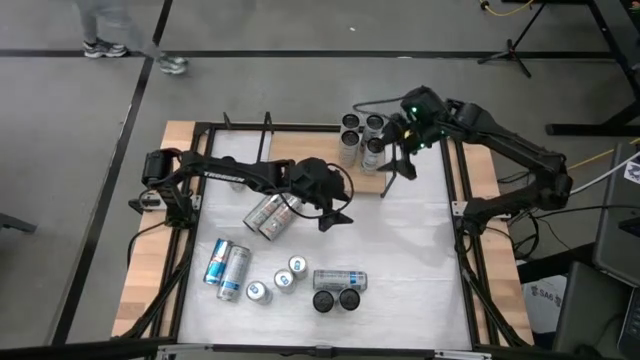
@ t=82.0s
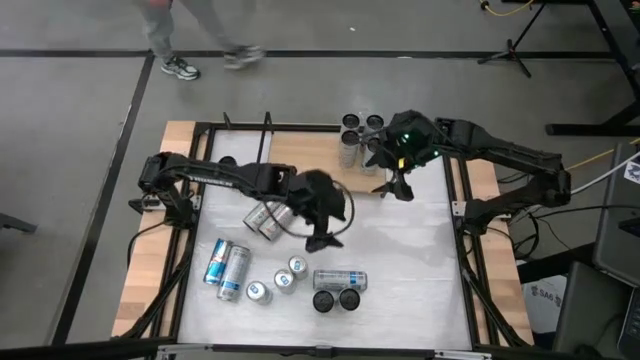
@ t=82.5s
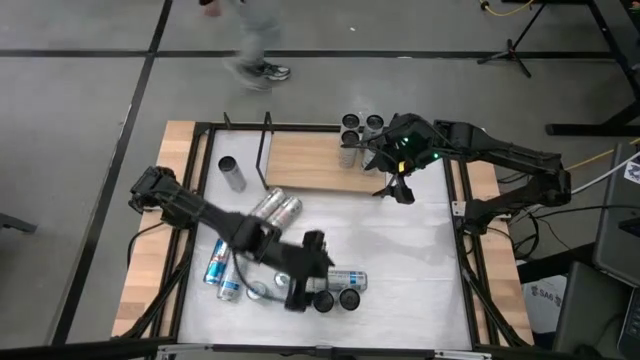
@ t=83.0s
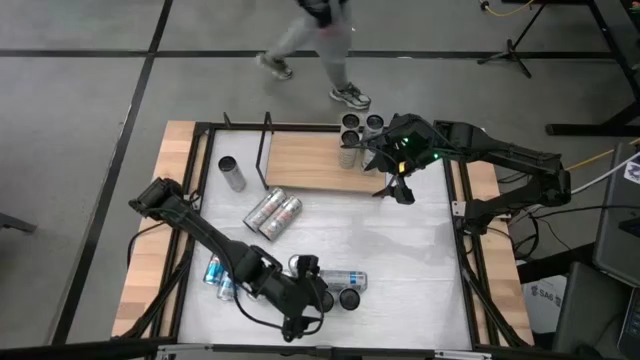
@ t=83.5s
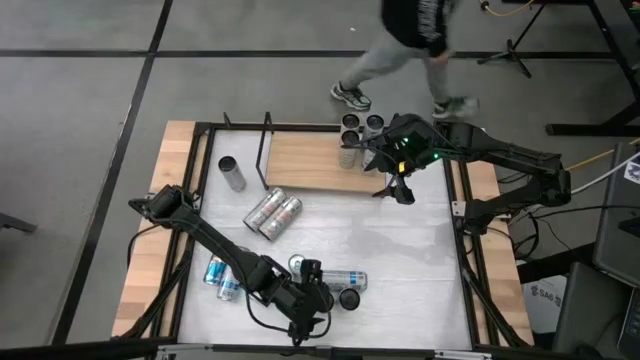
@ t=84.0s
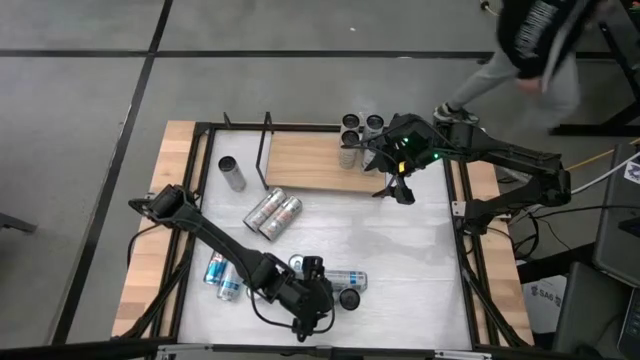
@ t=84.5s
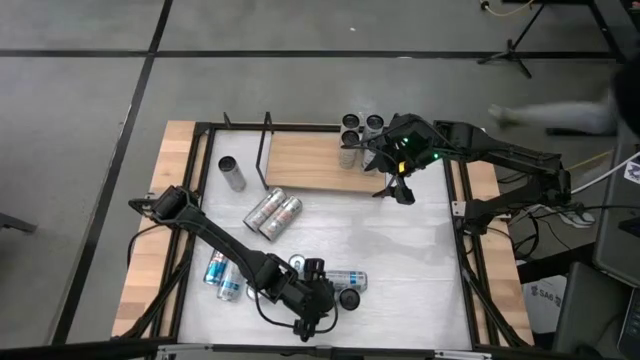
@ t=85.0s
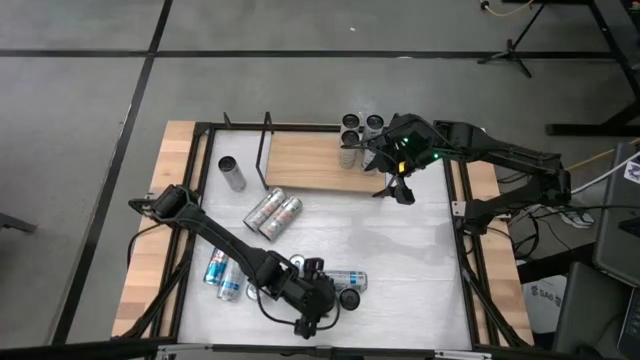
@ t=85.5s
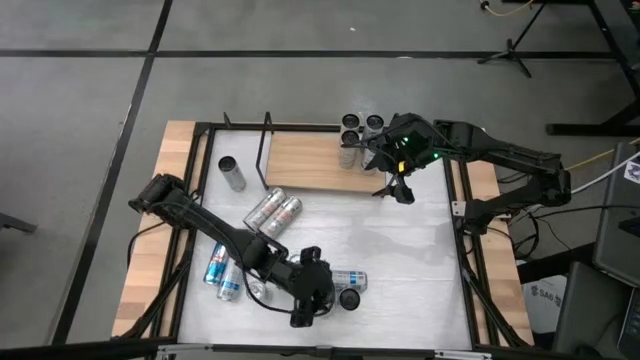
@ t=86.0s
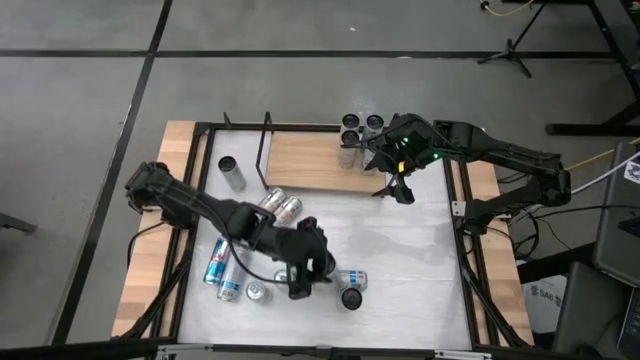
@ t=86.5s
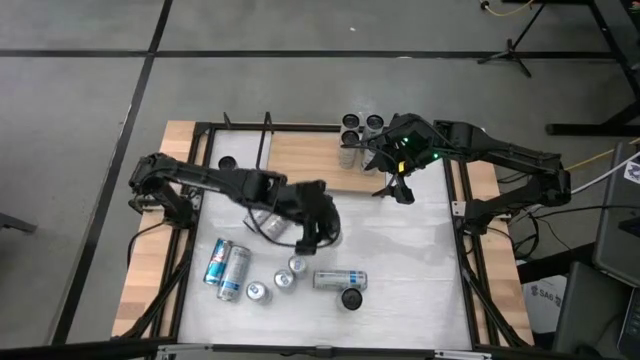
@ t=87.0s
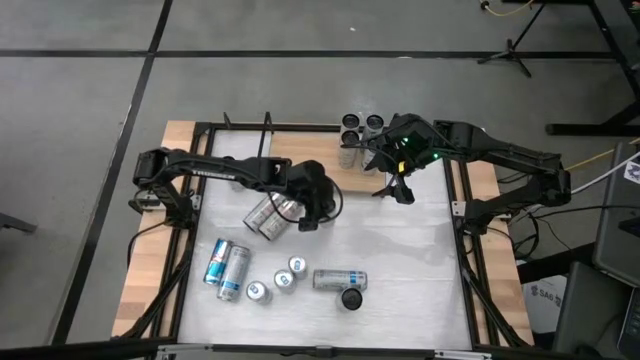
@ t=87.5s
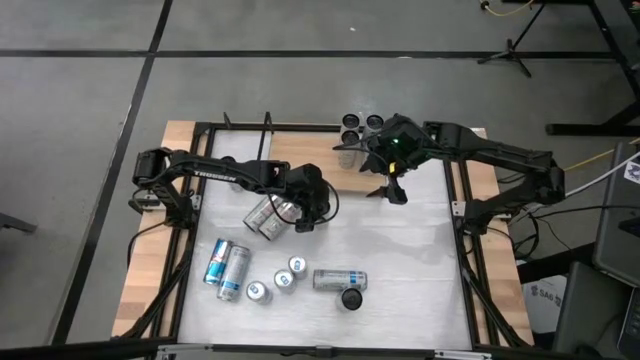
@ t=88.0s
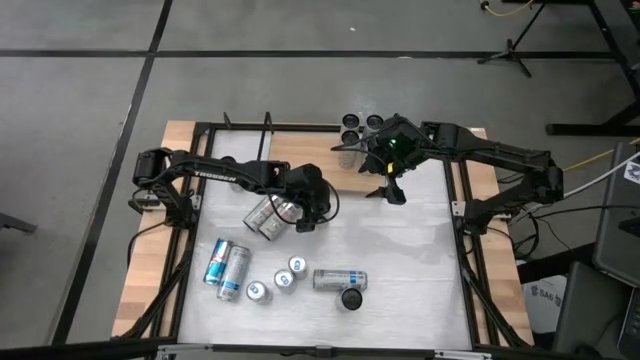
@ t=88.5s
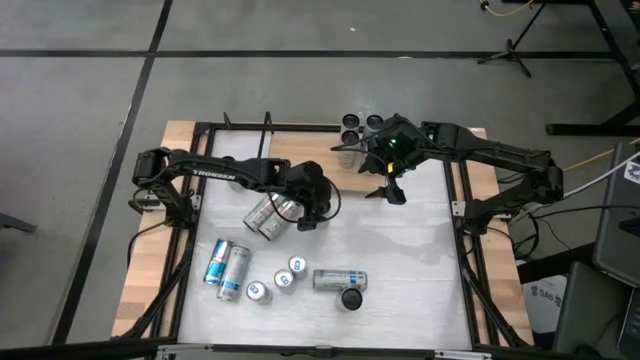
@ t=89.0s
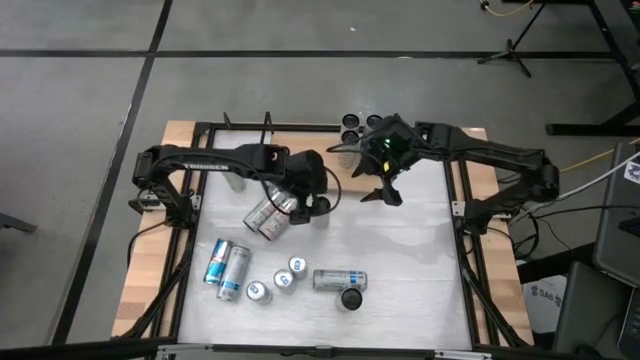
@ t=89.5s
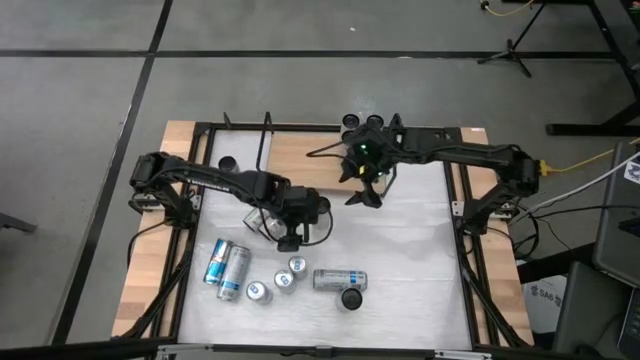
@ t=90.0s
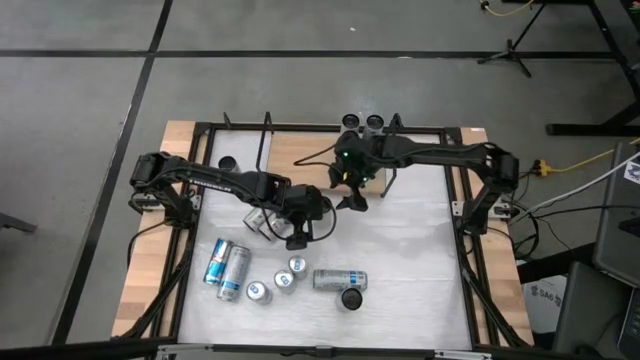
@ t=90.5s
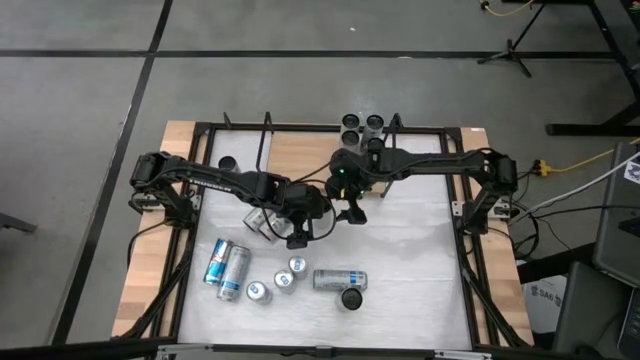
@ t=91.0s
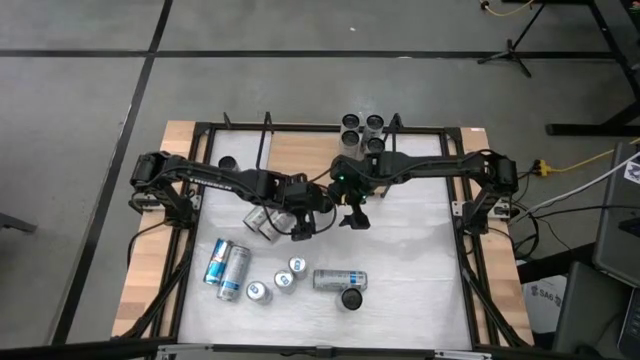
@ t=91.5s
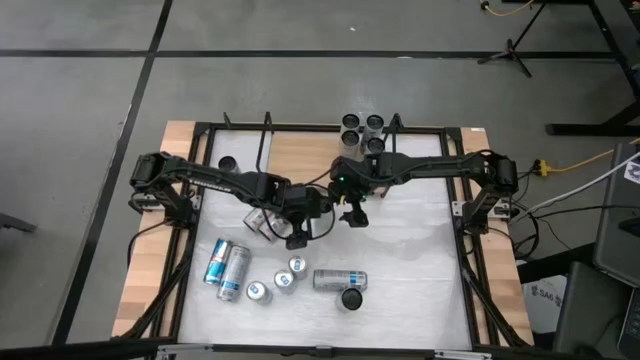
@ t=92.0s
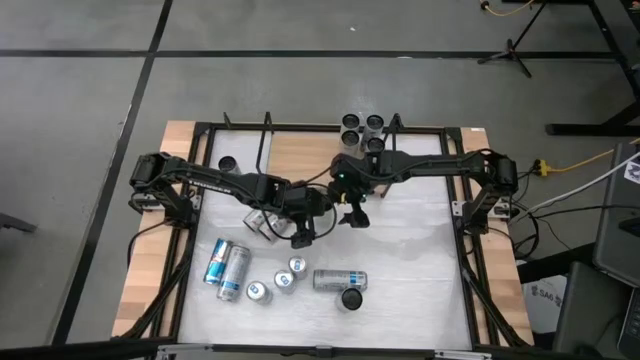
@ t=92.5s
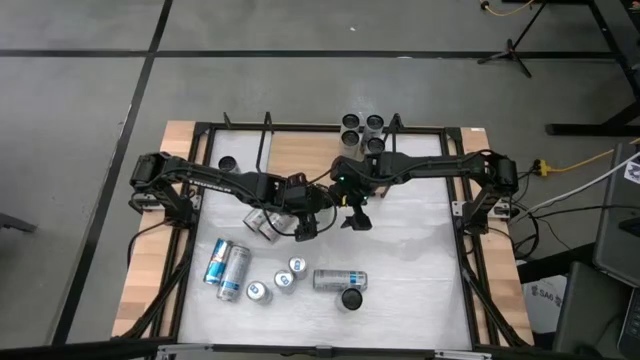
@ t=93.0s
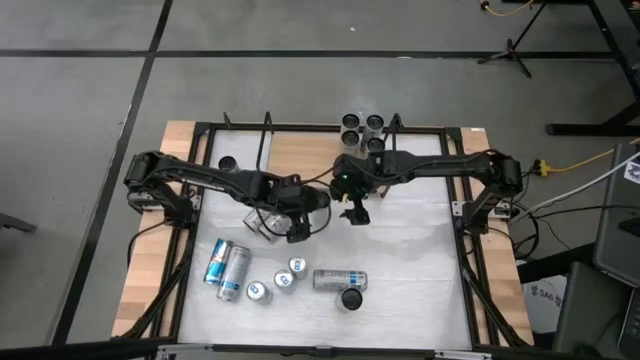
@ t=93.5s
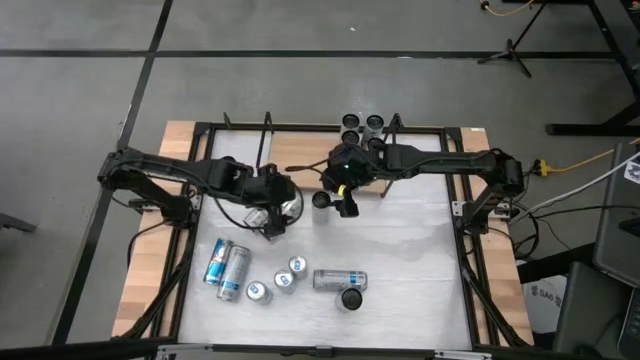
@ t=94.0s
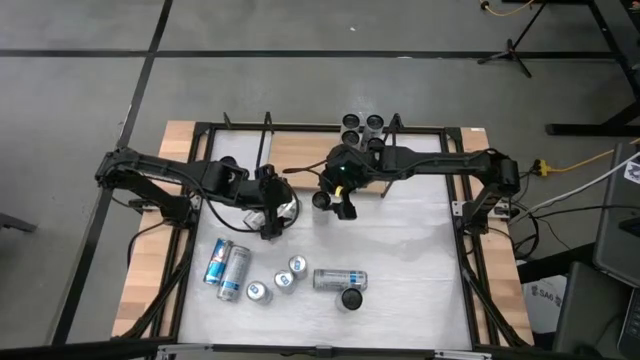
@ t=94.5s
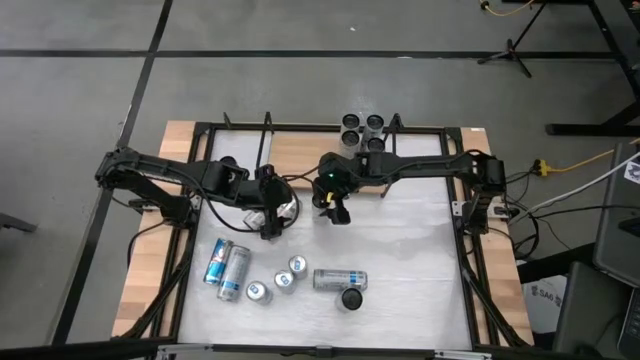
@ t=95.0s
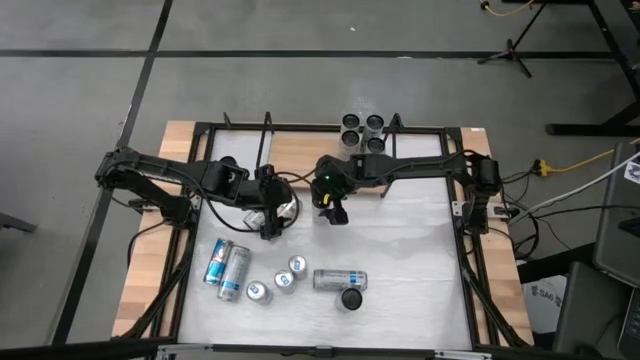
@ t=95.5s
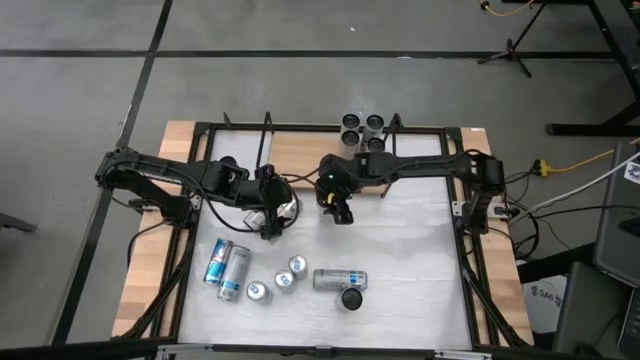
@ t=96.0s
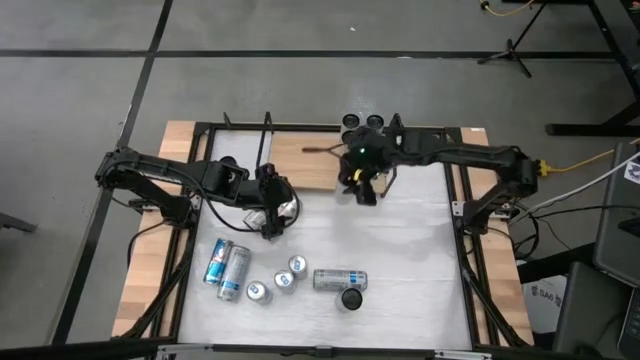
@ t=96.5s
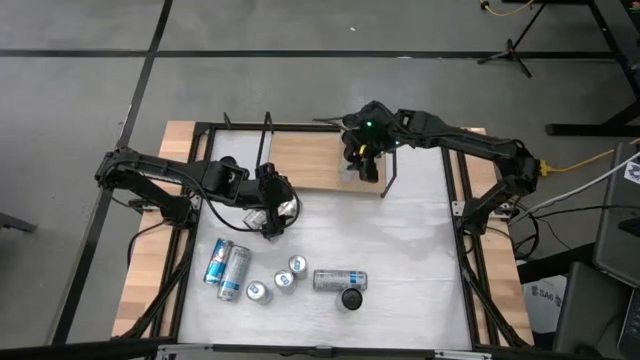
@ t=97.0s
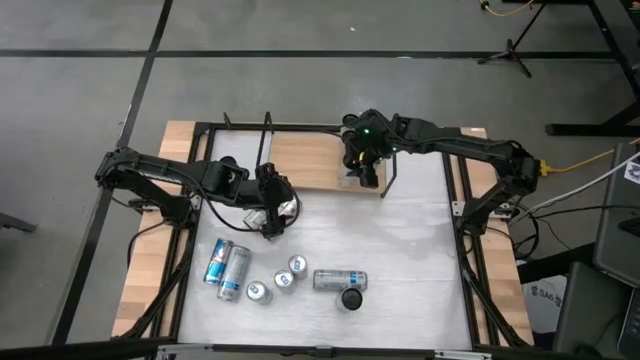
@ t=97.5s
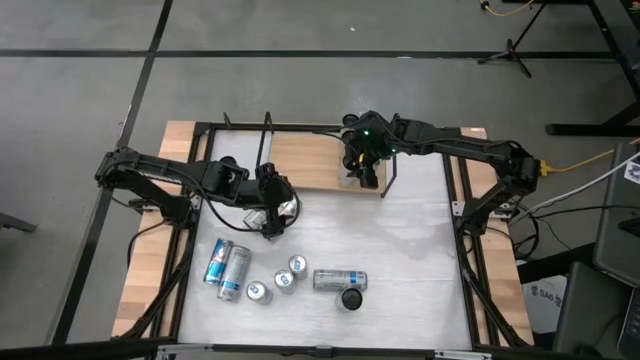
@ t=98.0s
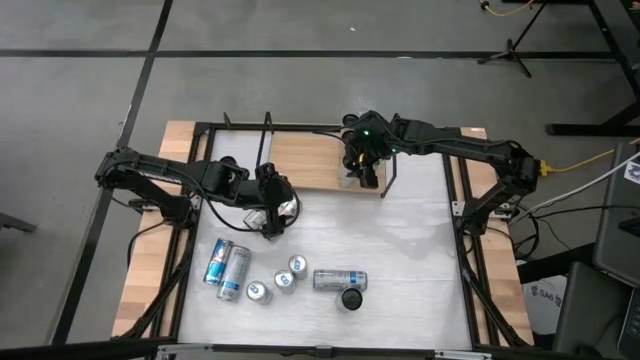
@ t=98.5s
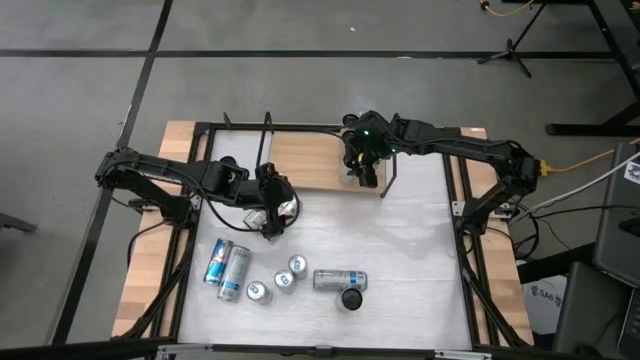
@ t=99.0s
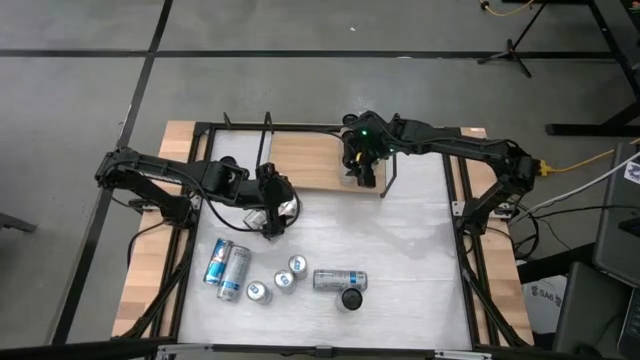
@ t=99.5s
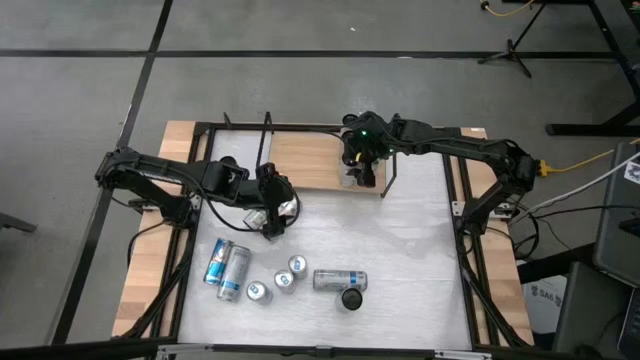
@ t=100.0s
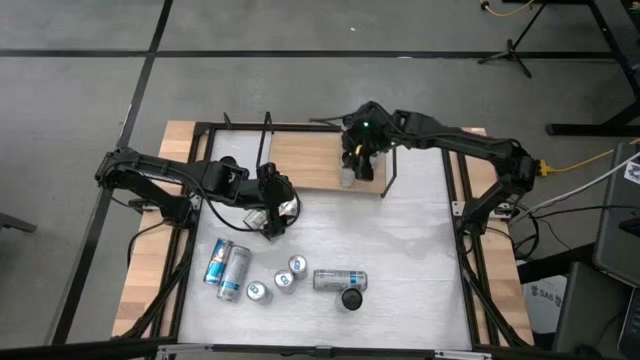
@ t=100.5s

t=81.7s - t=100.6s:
Task: Place canned beverage on shelf
Put the white soda can aligned with the other white soda can on the shelf

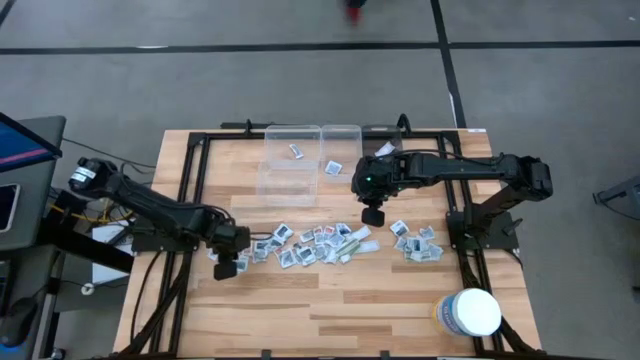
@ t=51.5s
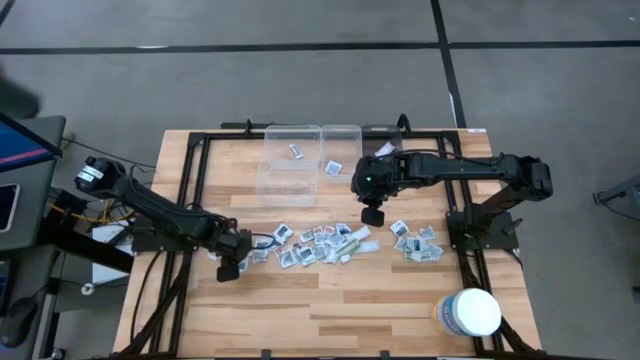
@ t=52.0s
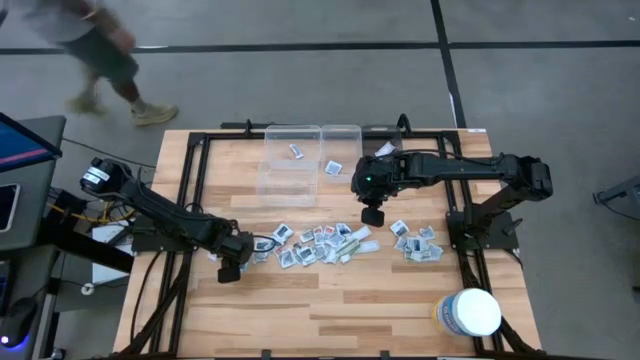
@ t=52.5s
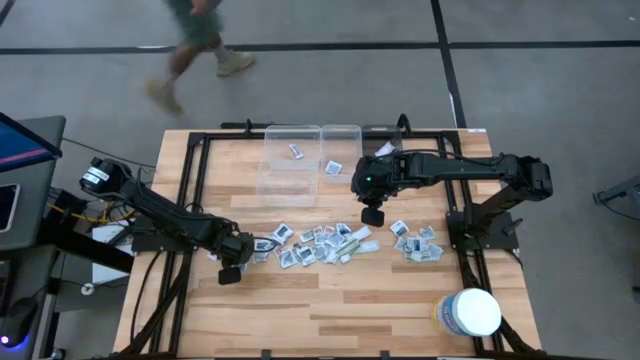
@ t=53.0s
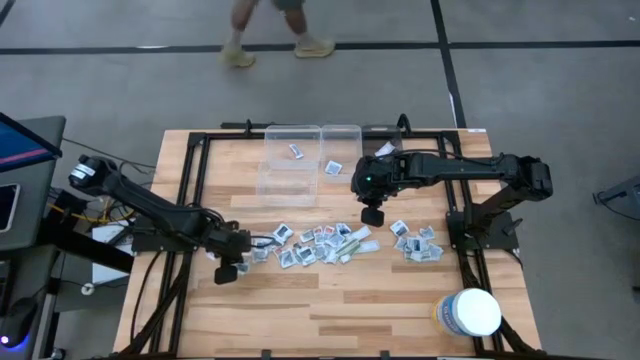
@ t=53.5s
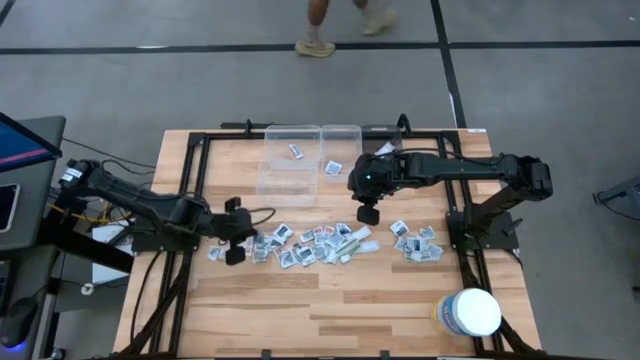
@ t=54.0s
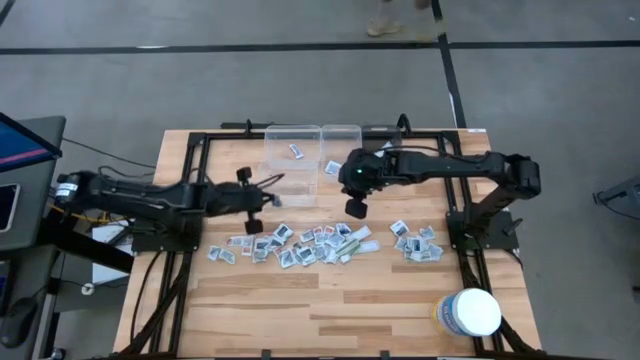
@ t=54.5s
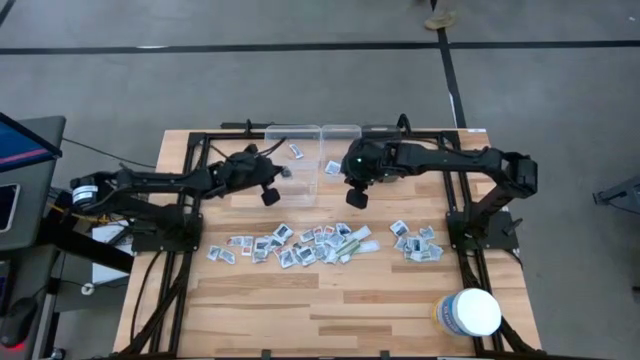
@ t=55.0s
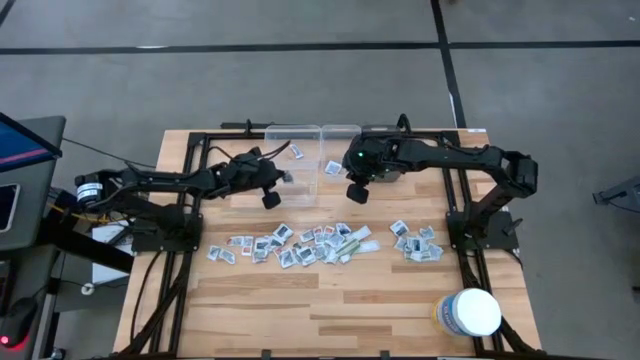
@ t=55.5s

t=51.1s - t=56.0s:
Task: Pick & Place First Aid Supplies
Put the towelette pack into the bottom transparent bin
